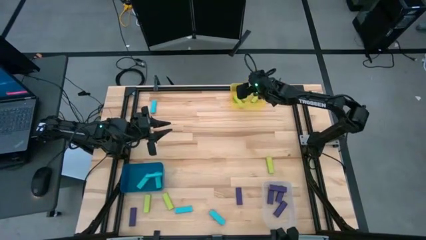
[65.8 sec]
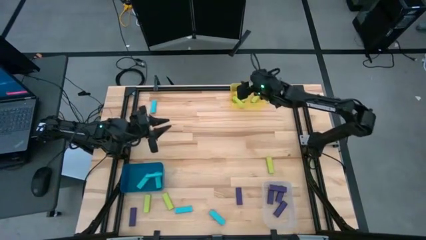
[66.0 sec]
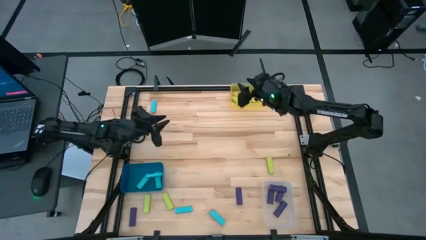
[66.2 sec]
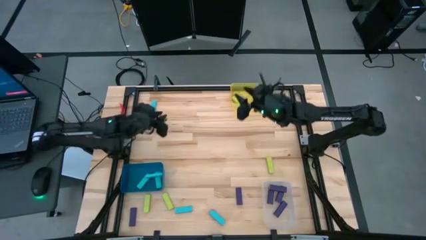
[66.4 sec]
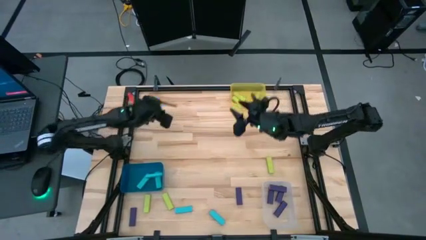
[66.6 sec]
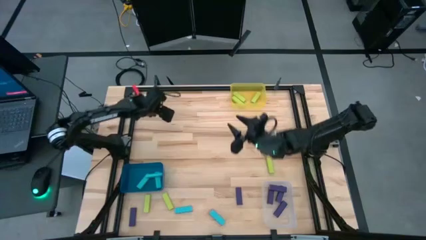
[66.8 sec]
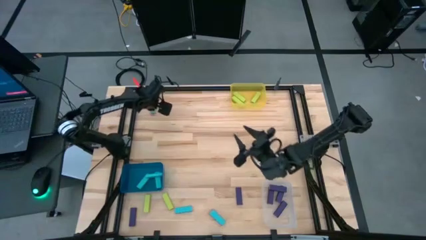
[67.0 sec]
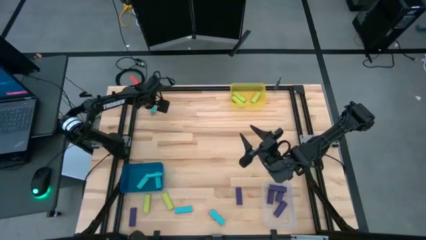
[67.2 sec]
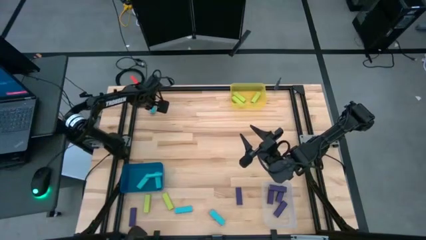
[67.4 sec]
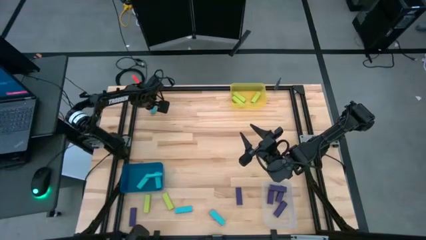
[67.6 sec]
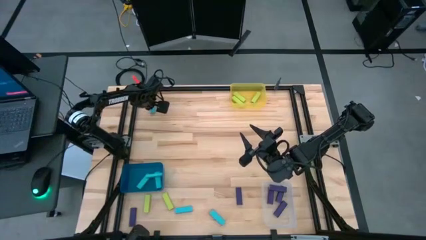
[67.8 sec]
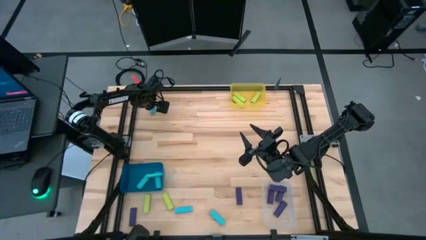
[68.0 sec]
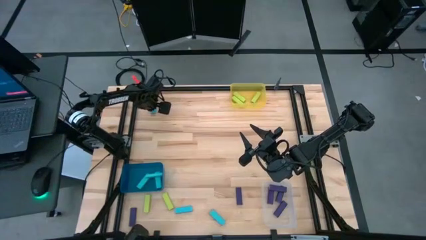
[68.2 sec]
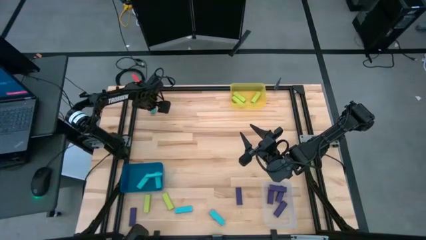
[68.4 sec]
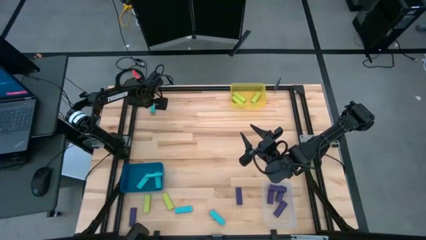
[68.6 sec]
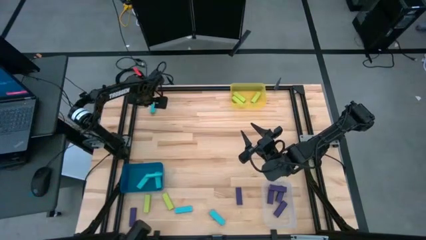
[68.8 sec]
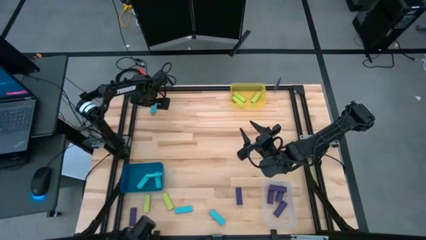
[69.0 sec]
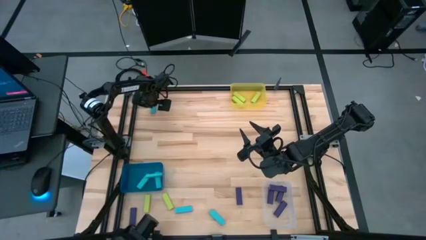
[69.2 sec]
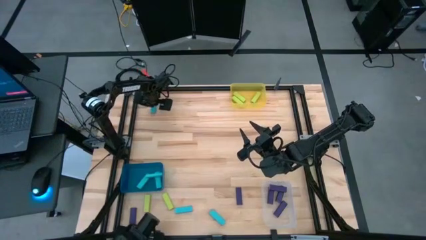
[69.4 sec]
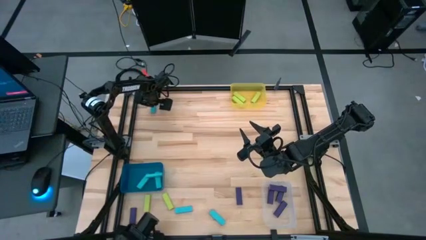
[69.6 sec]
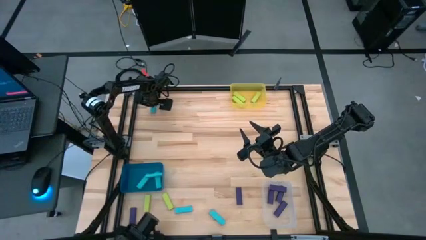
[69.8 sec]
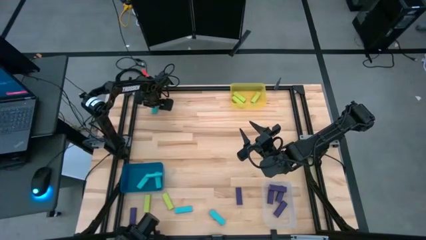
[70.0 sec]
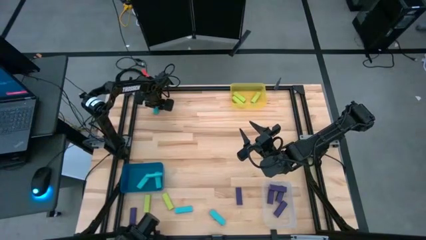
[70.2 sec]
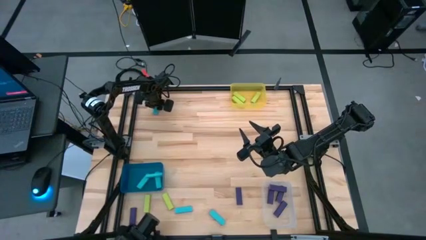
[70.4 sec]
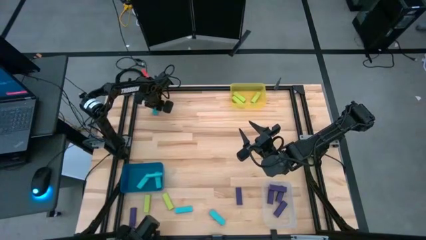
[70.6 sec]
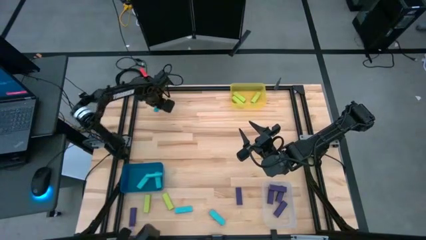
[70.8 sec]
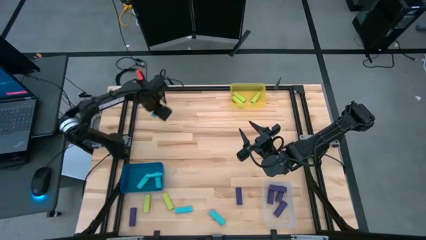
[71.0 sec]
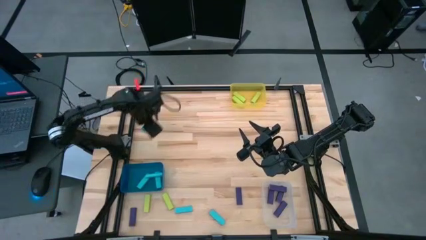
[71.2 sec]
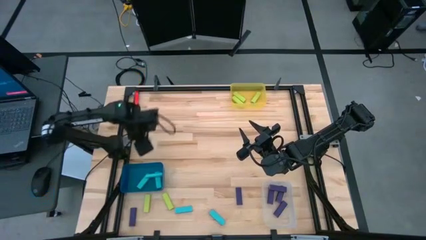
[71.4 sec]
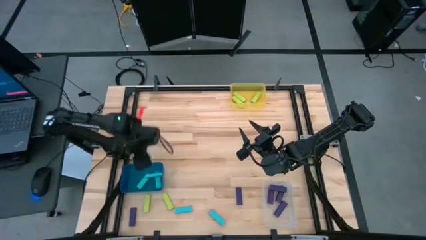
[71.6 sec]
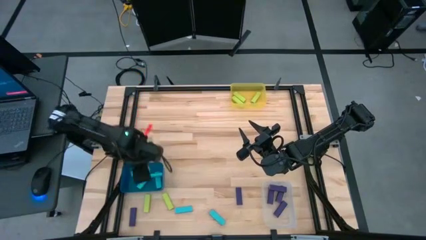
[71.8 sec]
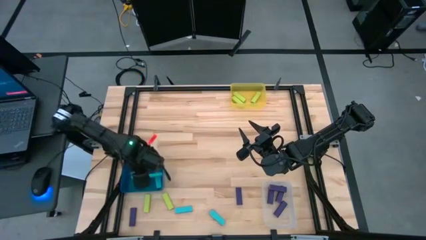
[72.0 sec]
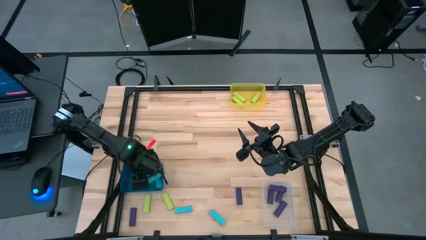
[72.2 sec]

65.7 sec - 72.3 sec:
Task: Sort blocks
Put the top blue block into the dark blue bin

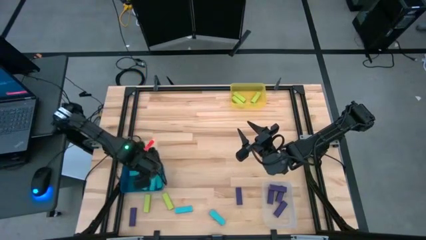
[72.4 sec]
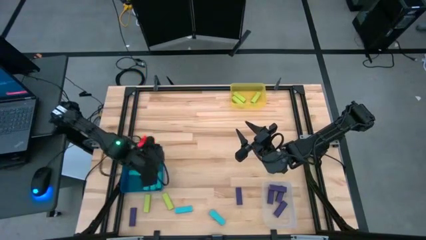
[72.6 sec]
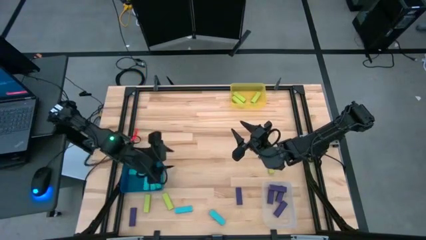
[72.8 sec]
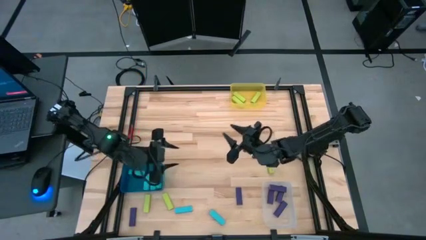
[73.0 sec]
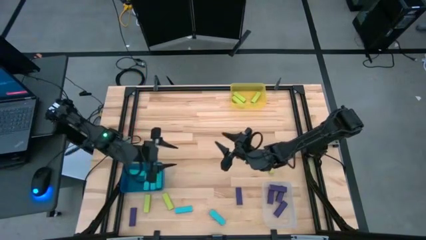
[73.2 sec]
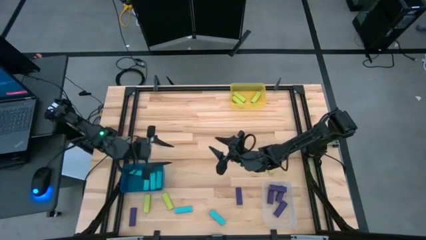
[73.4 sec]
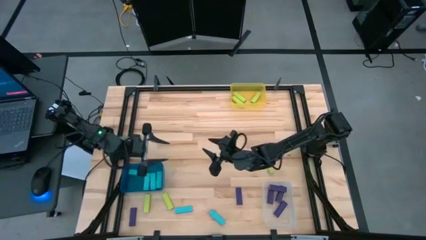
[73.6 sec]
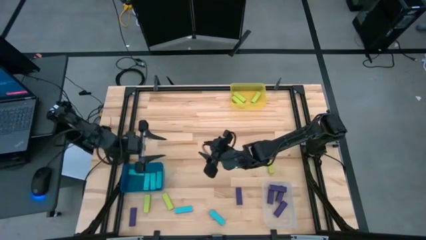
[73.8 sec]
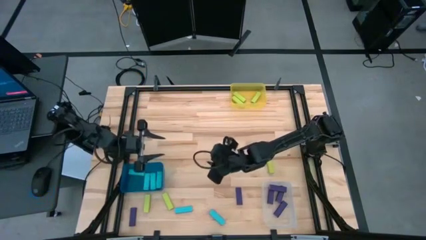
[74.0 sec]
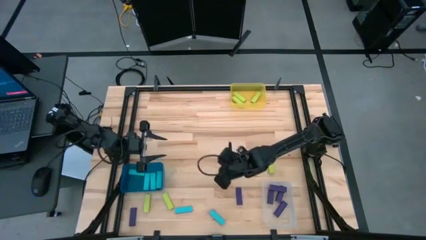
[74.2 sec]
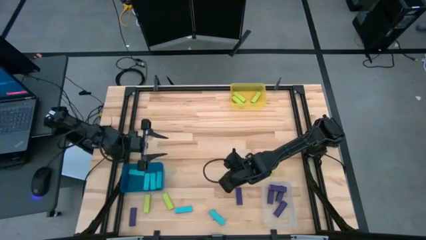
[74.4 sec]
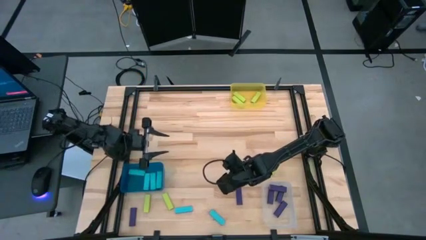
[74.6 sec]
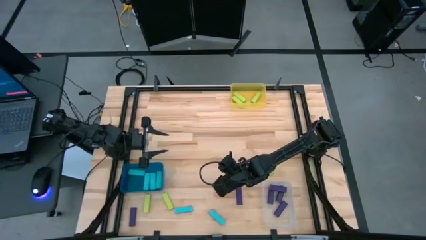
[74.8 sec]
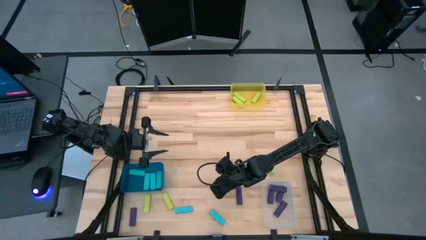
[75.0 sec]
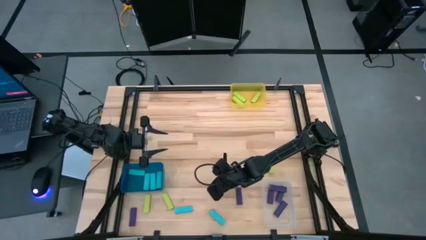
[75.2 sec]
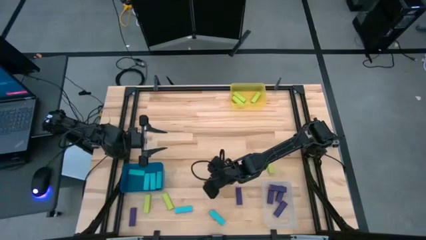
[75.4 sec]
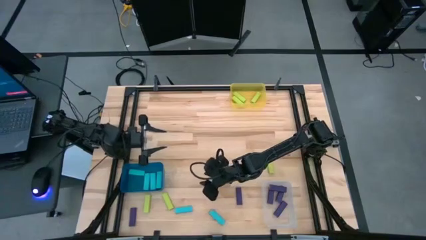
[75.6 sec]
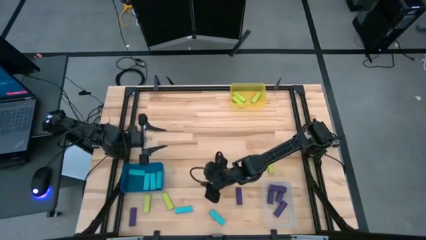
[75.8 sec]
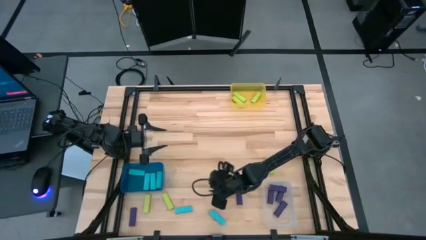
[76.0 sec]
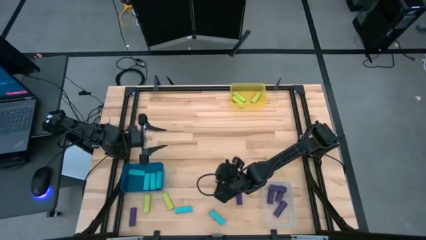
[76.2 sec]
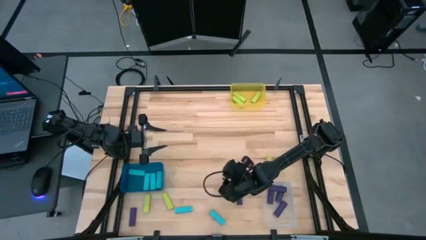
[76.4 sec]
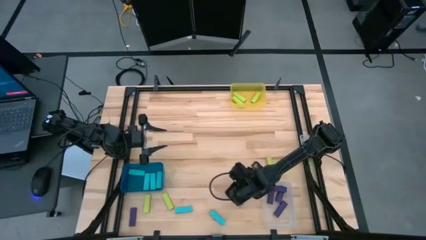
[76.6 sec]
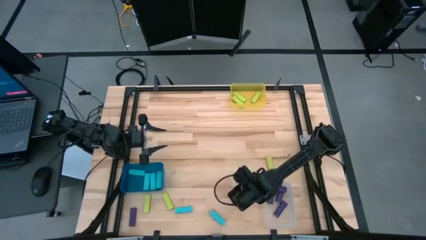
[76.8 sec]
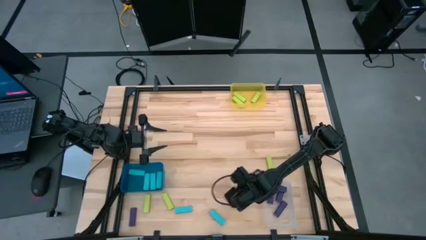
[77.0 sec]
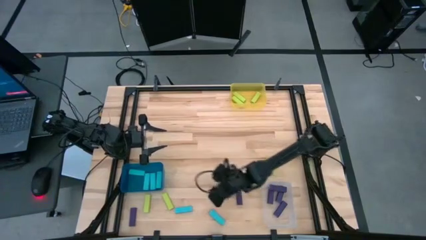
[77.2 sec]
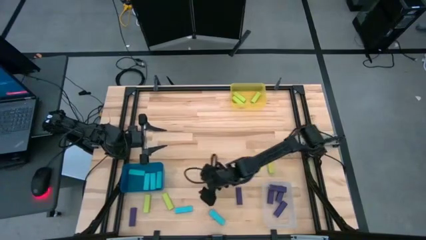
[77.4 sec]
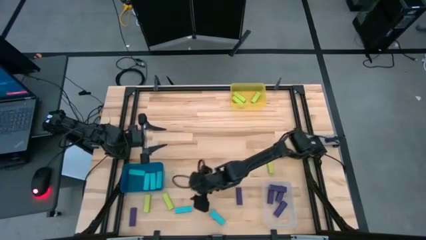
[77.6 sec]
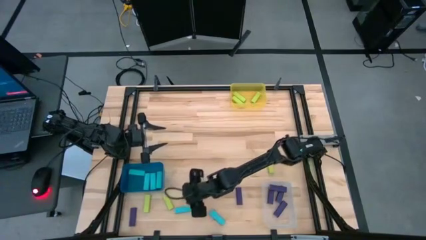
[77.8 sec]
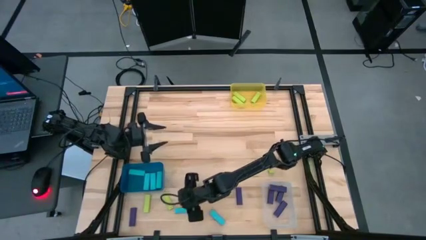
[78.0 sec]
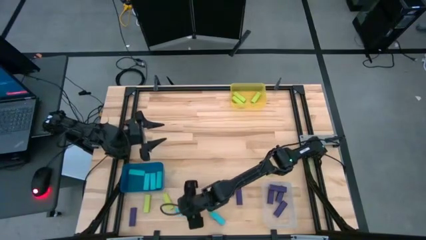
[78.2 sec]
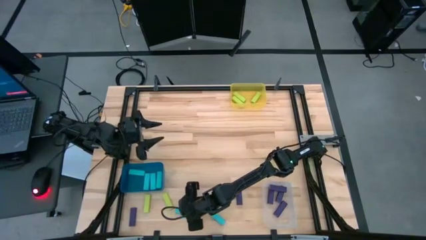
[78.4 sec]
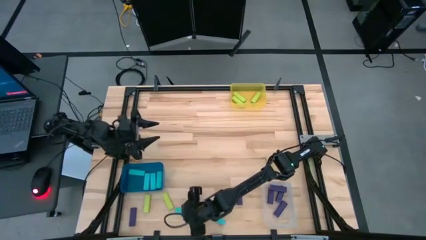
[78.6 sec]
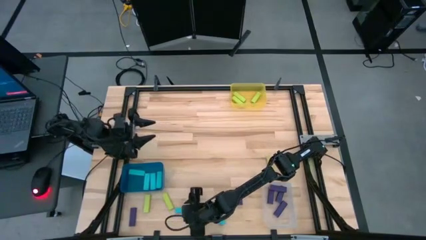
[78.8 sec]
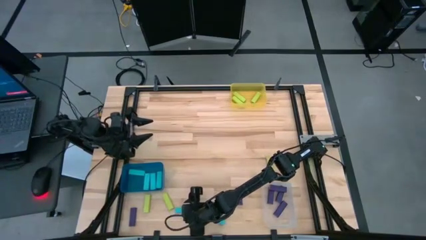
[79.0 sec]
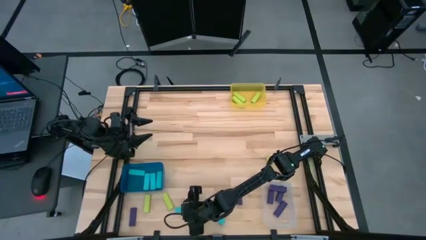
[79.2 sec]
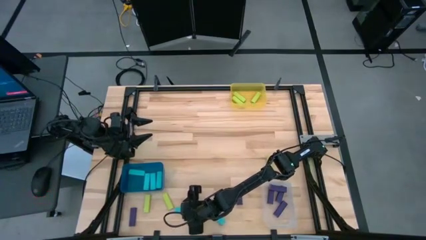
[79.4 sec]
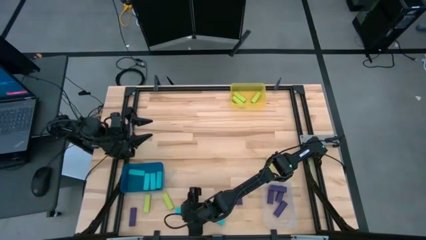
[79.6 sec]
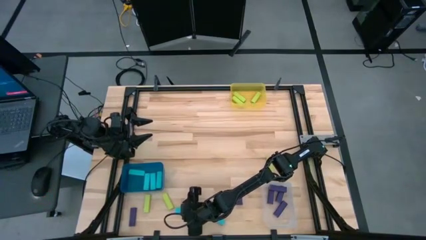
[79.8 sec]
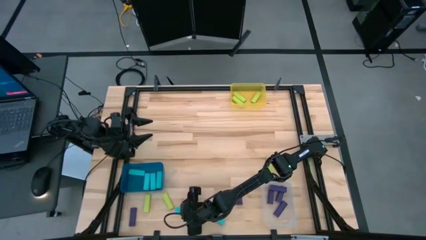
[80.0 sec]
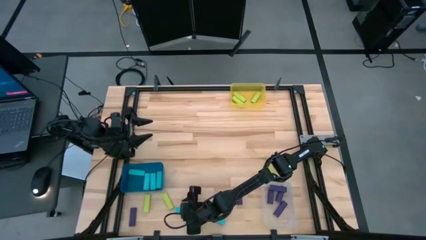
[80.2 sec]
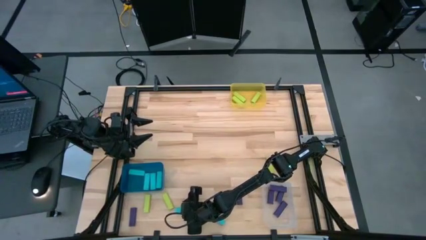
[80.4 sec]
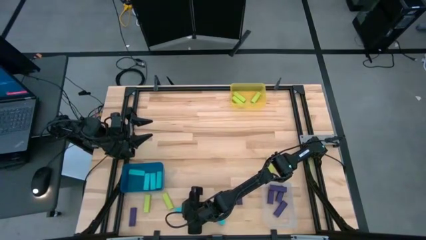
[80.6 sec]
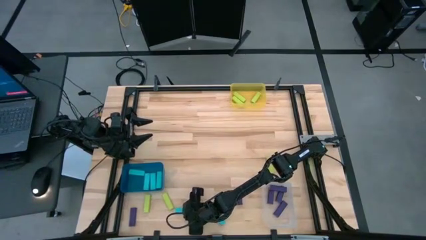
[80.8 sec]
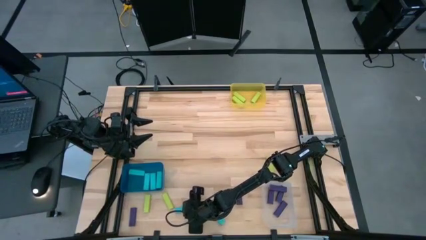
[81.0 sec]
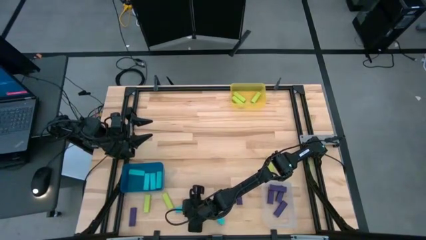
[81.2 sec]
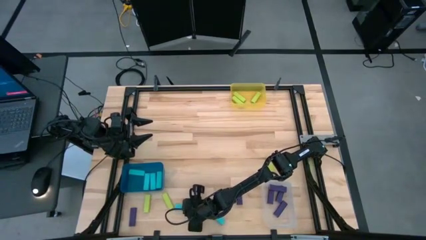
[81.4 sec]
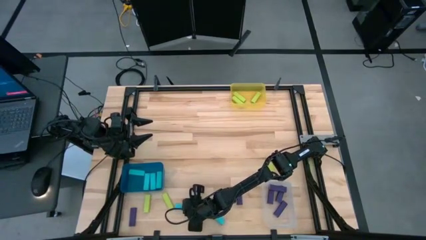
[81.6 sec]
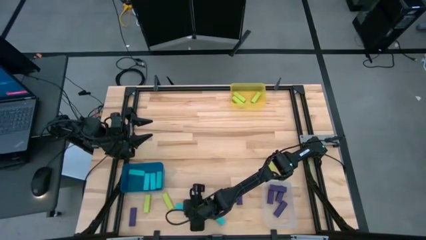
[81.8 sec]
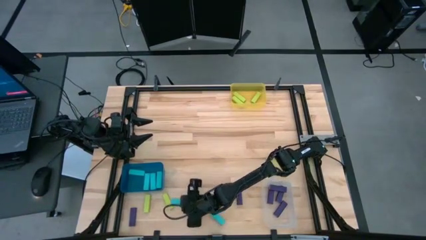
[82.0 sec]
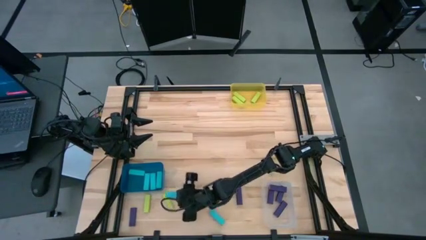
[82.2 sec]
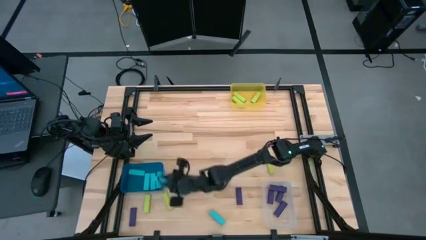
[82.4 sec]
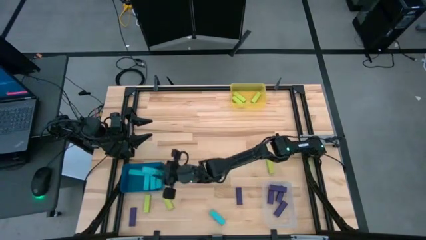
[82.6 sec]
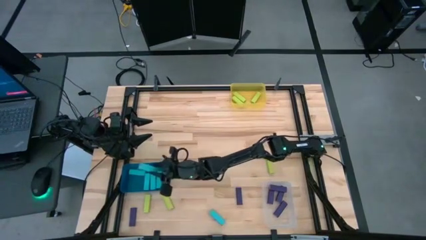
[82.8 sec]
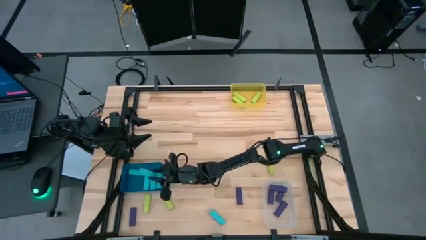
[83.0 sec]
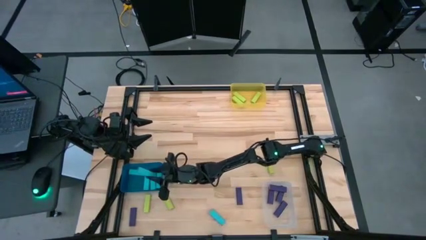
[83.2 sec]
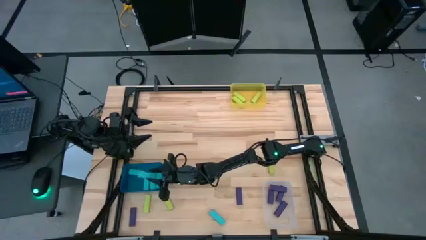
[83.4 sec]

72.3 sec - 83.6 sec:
Put the left blue block into the dark blue bin
